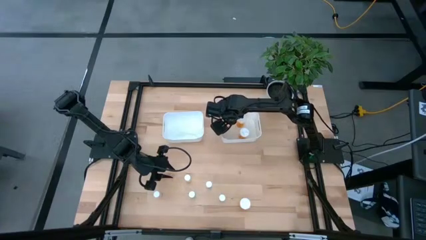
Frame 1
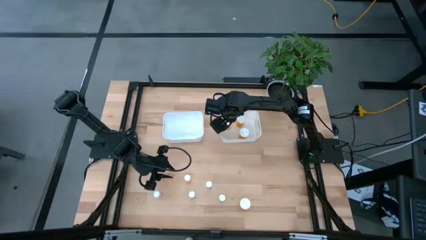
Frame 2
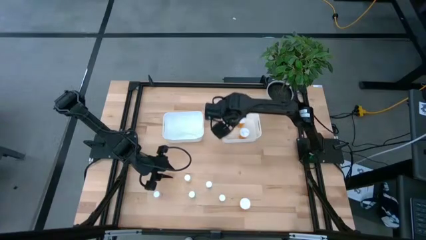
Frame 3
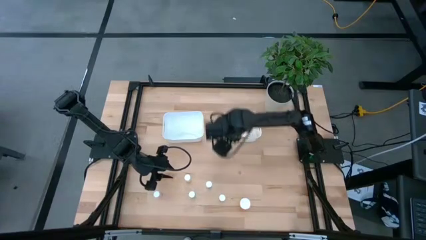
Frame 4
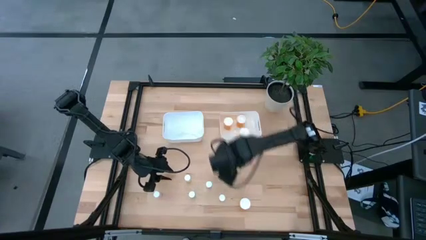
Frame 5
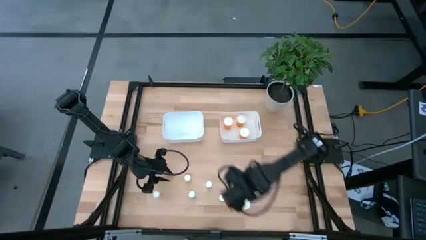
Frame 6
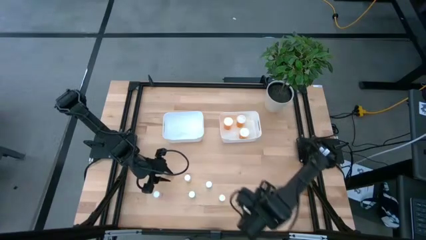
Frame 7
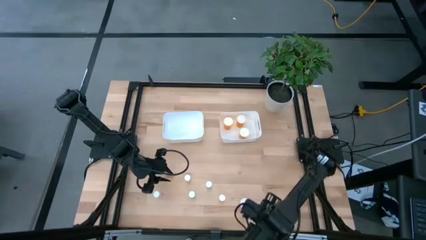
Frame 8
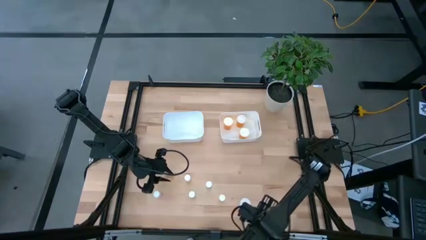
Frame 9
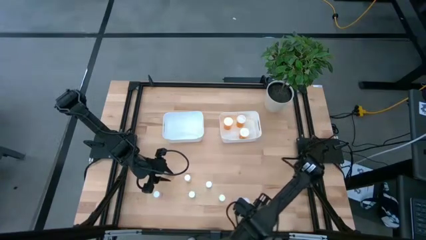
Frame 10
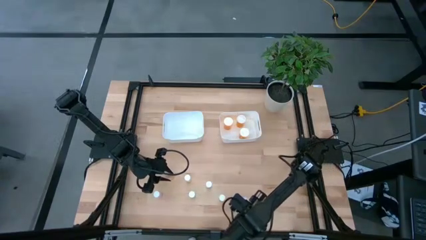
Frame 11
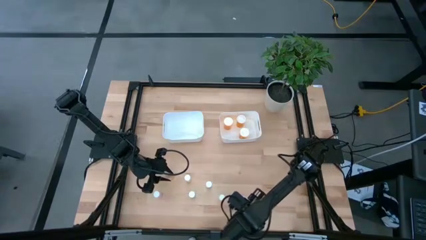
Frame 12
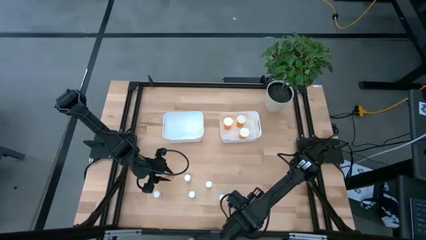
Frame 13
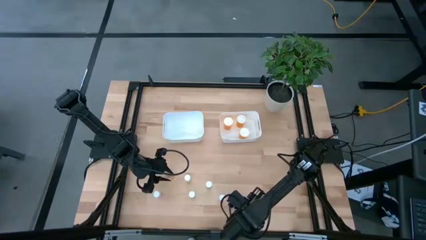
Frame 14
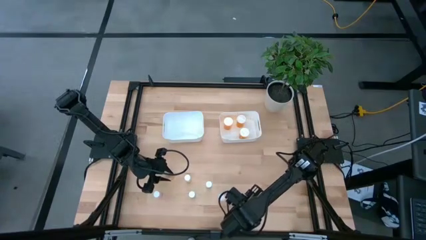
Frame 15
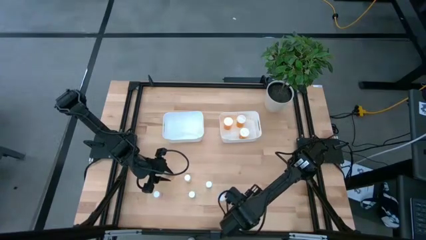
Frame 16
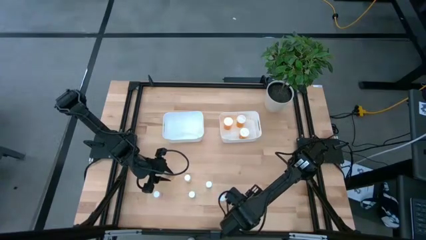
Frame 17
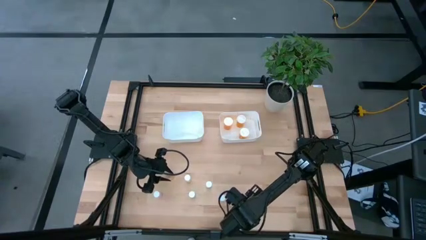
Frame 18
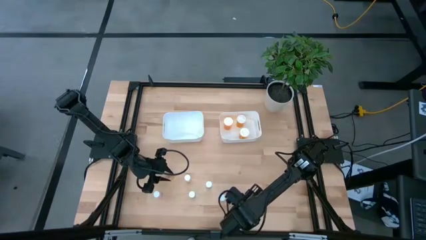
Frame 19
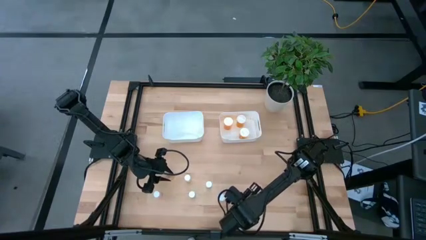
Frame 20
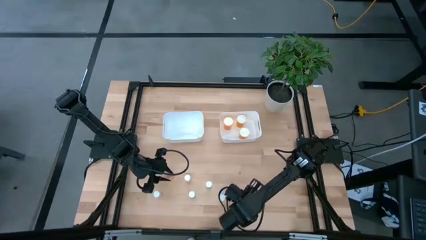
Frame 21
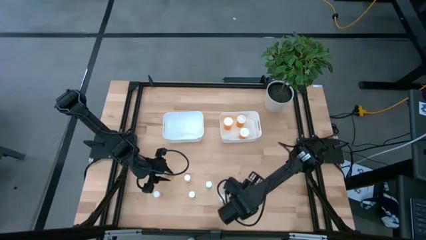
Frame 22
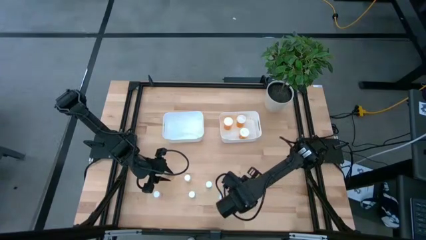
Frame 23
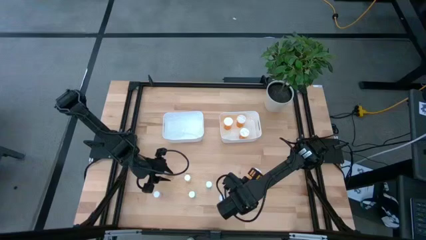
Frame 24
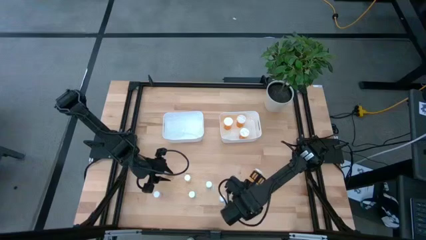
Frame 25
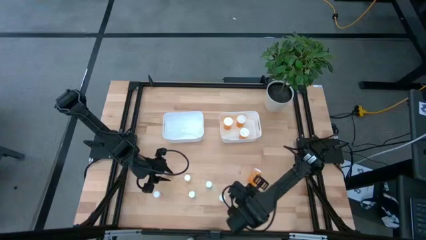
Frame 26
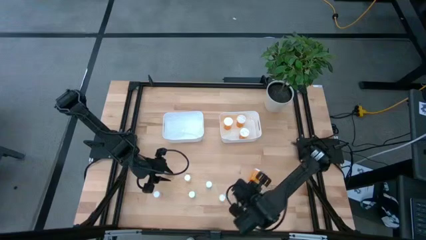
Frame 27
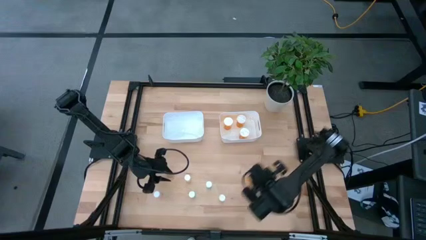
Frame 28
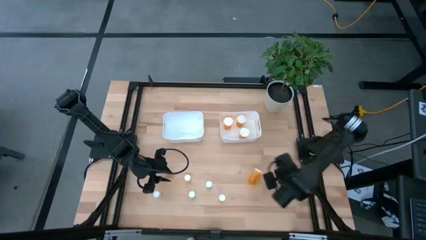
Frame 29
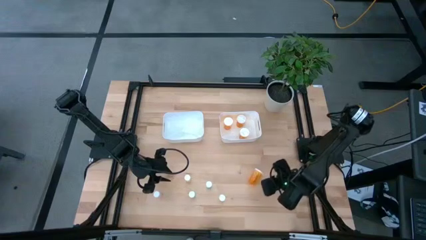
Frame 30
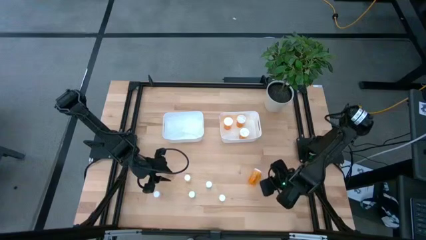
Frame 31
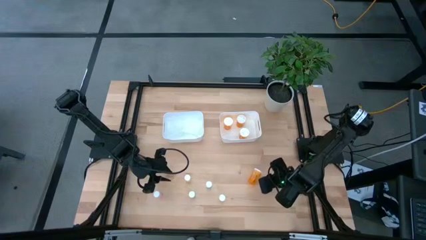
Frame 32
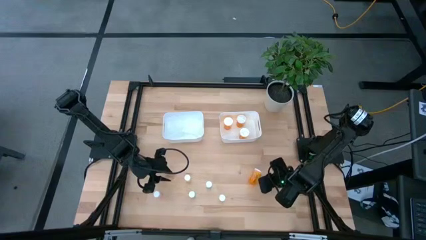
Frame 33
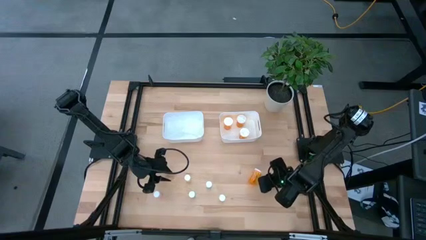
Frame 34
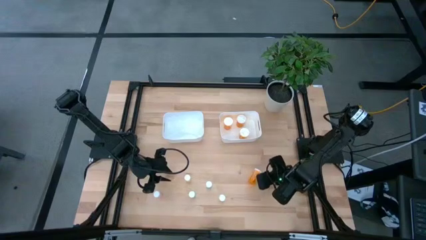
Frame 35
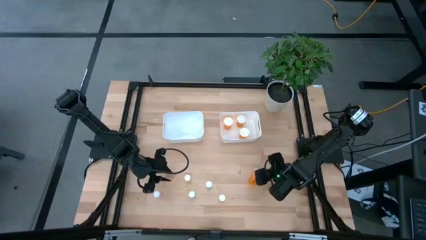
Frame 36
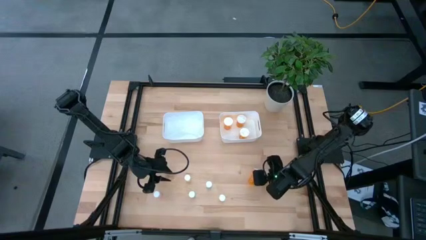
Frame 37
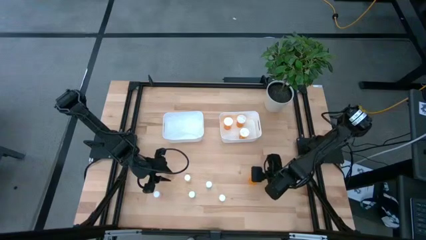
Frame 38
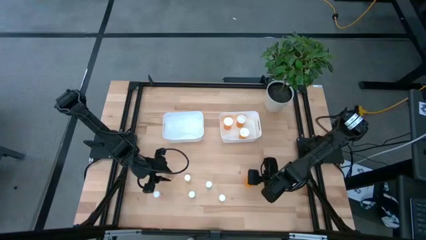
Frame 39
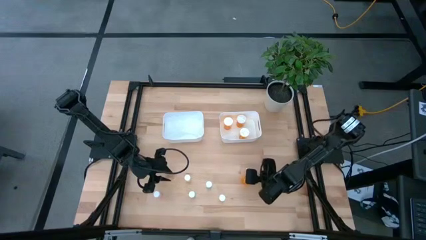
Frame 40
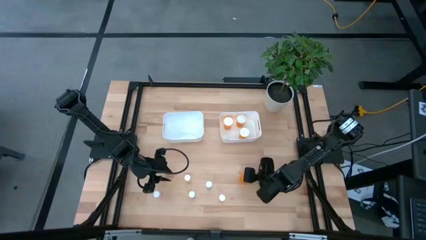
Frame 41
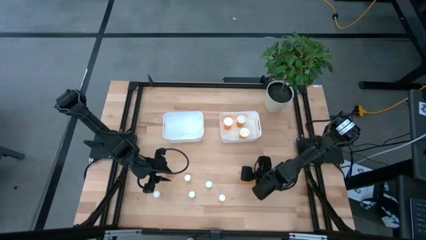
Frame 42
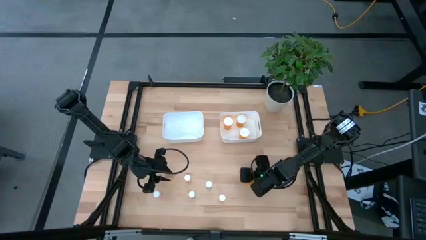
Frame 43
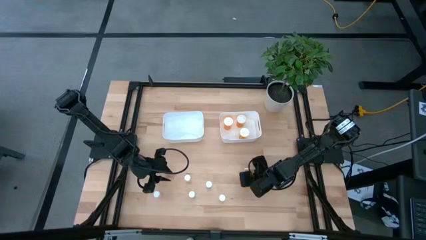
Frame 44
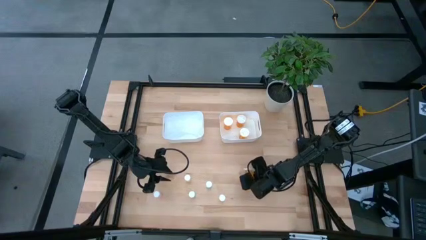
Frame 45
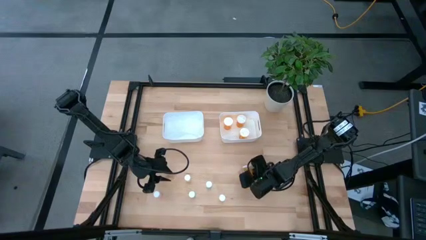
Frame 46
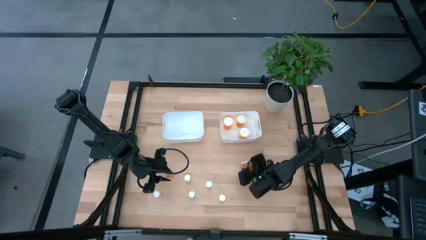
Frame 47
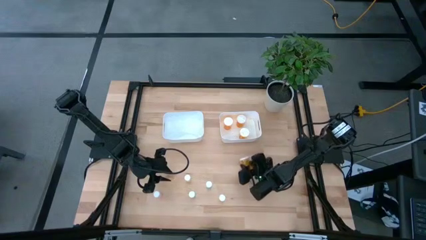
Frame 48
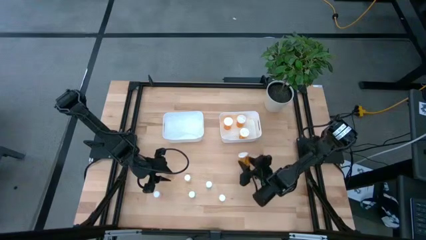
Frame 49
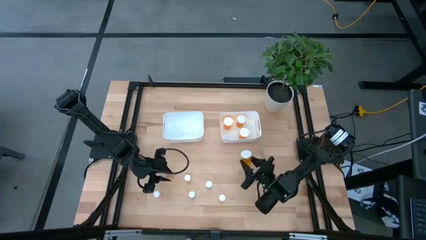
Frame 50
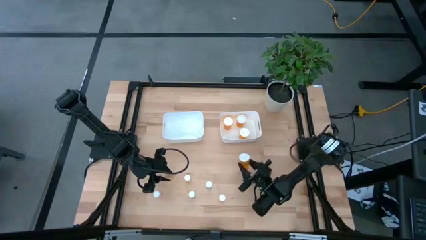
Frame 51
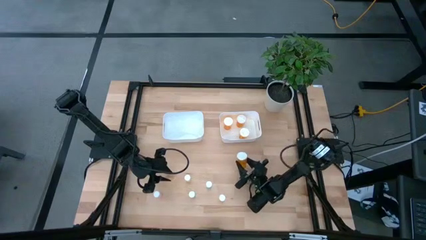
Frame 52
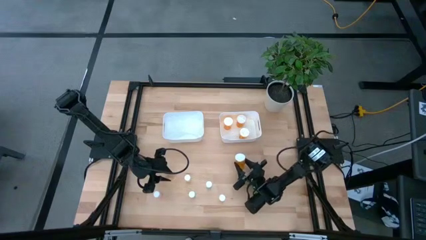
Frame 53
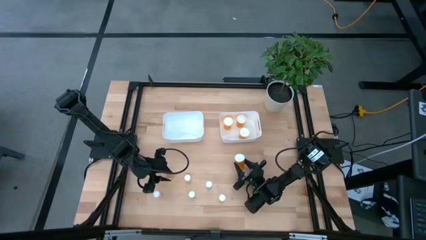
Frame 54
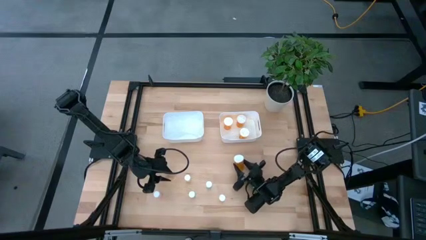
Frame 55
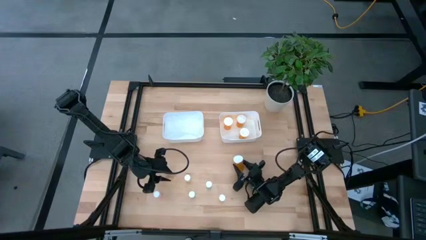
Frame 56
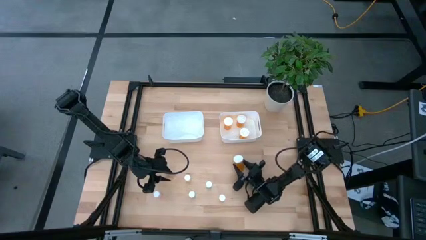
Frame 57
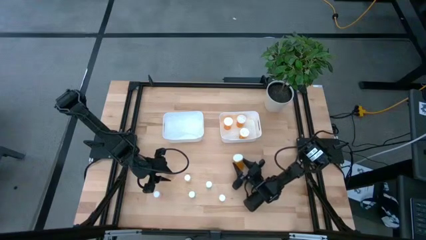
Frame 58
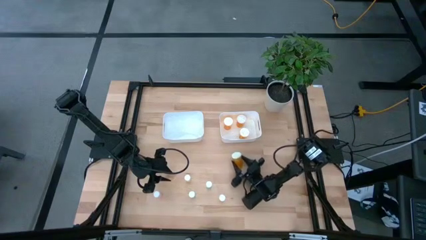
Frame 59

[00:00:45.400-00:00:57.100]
Task: Pick and place medicine bottles into bin by pill shape (circle, oval)
Put the right orange pill bottle into the right white bin

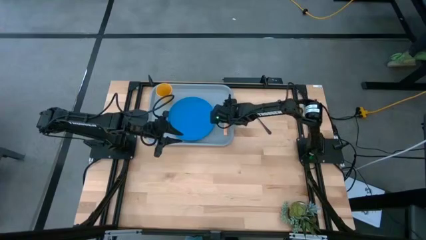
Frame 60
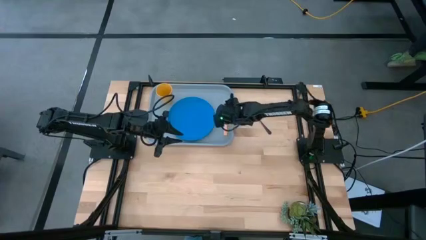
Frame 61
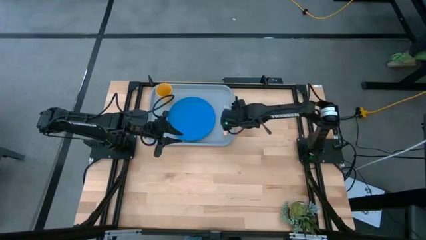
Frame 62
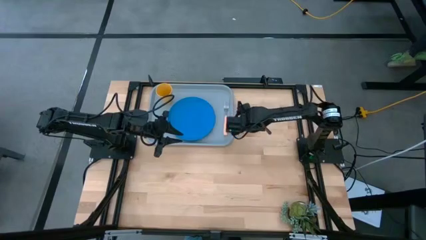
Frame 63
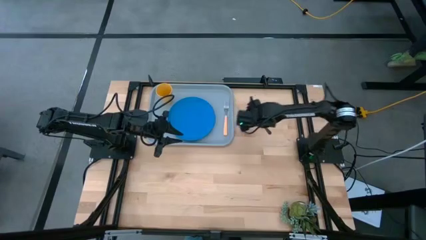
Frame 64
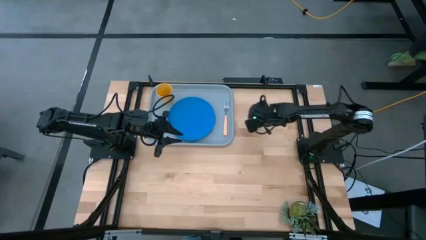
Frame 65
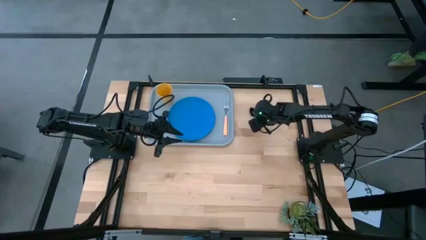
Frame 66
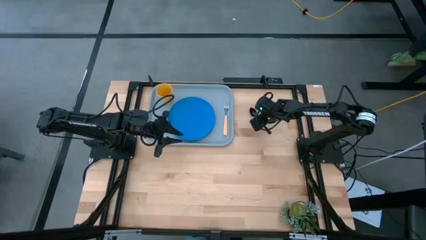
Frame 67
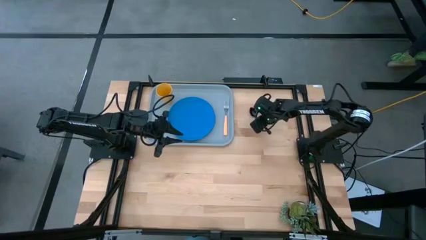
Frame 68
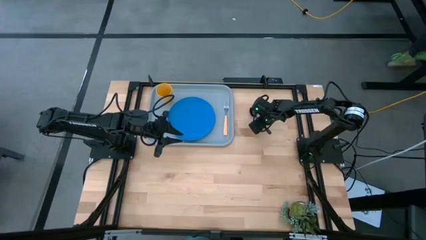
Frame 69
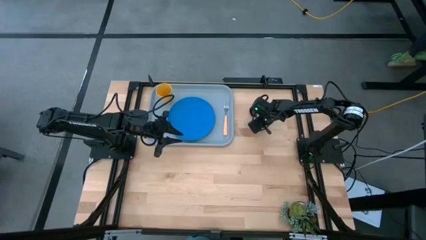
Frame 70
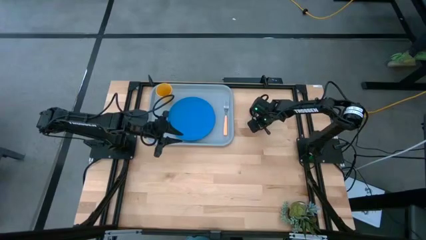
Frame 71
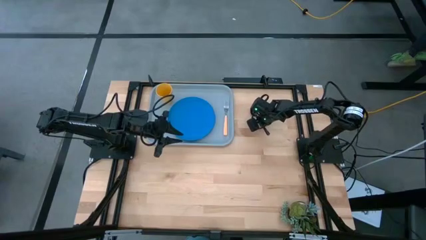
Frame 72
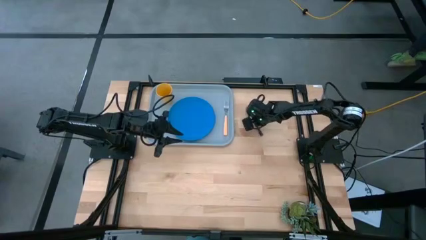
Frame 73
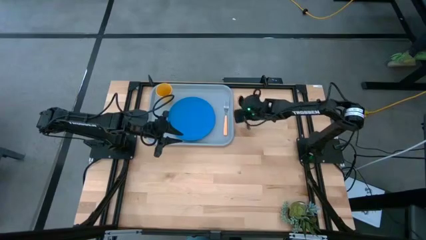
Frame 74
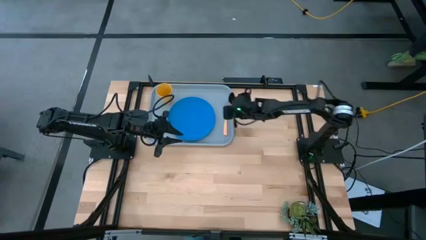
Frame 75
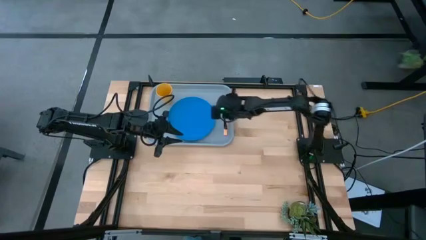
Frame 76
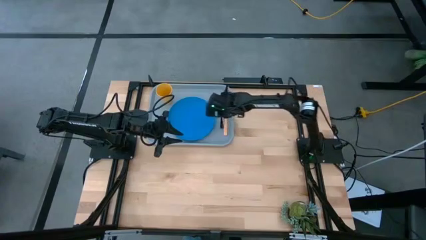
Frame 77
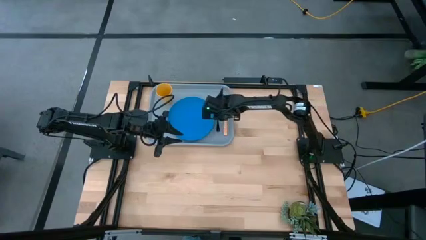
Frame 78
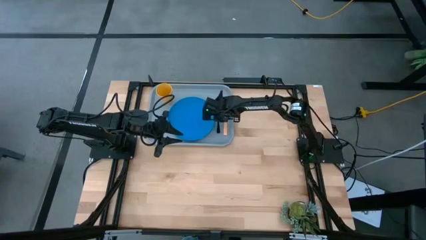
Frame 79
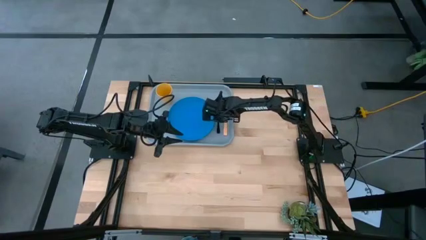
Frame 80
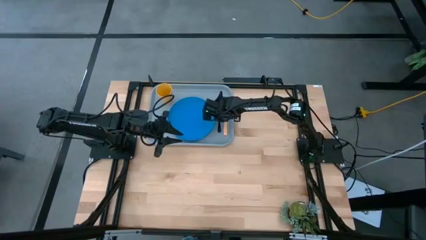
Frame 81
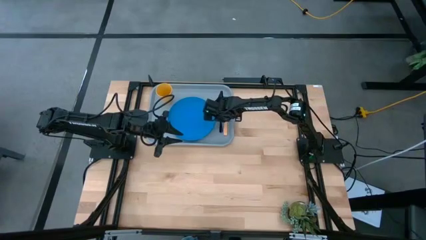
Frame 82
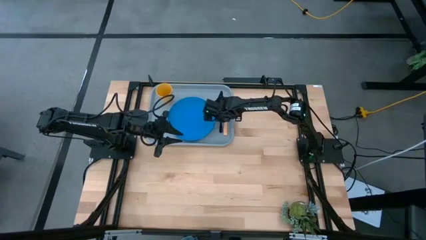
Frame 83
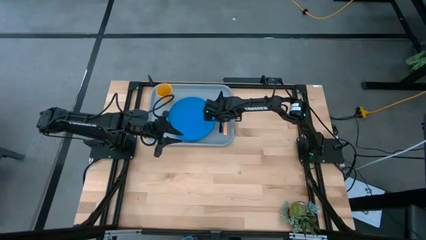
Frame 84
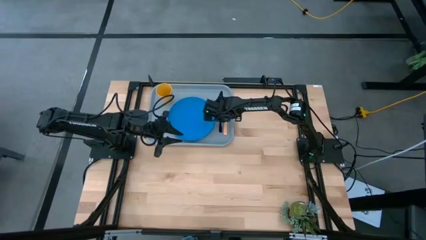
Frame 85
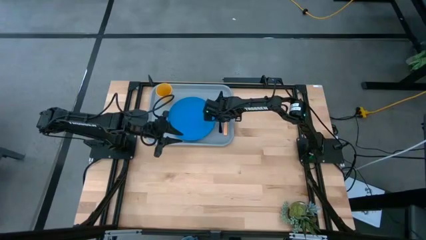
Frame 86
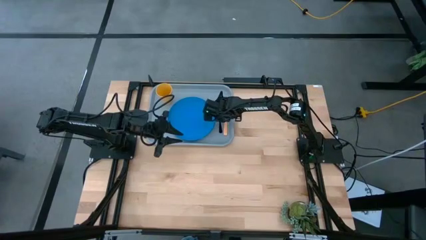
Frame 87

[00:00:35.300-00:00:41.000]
Task: Pick and place plate/cup/fork/spoon on tray
Put the black spoon on the gray tray between the blue plate and the orange fork

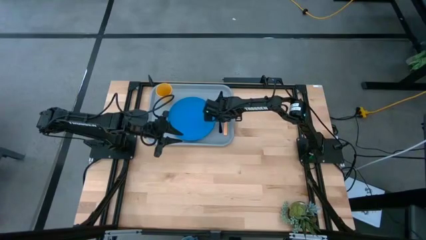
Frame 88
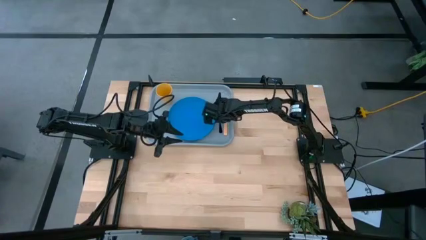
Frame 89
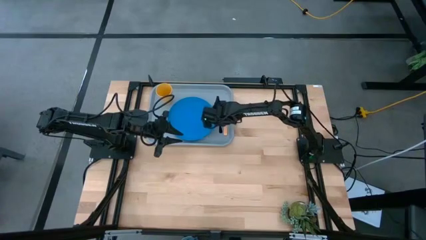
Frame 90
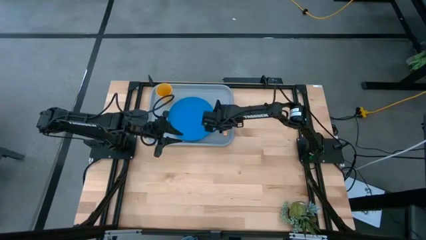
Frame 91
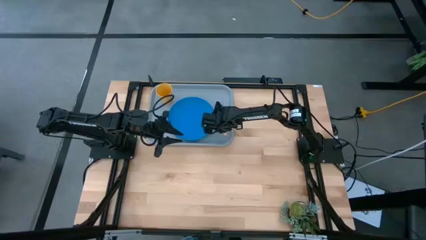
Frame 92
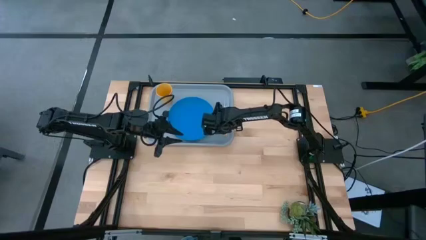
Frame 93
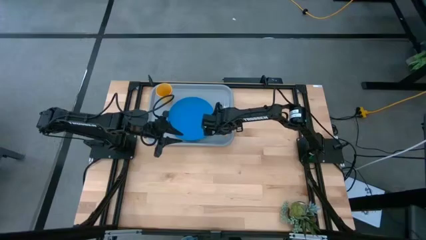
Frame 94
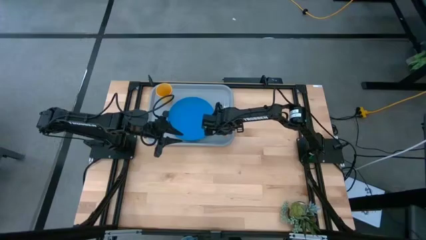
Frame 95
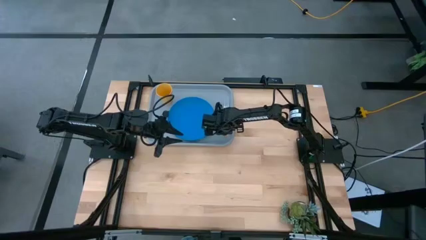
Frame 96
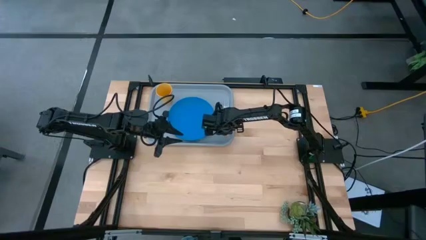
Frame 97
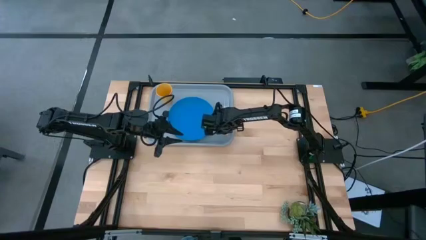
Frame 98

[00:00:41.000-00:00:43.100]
Adjust the orange orange fork on the gray tray
